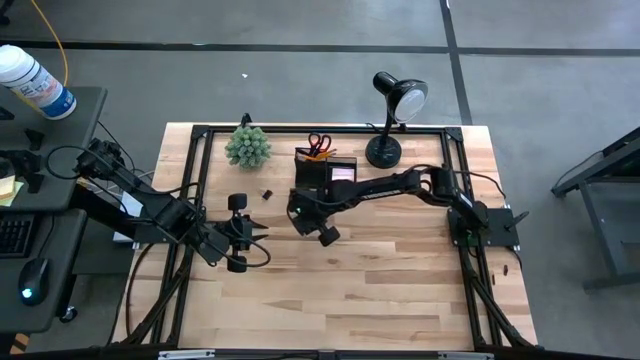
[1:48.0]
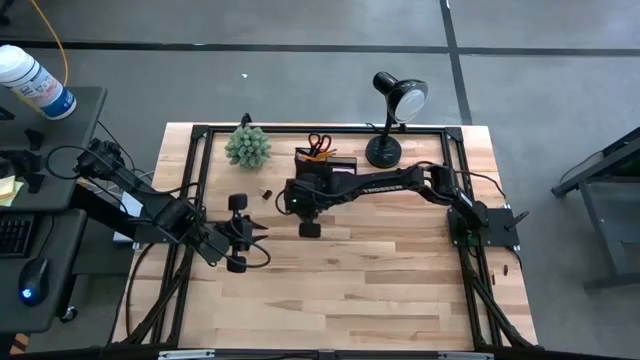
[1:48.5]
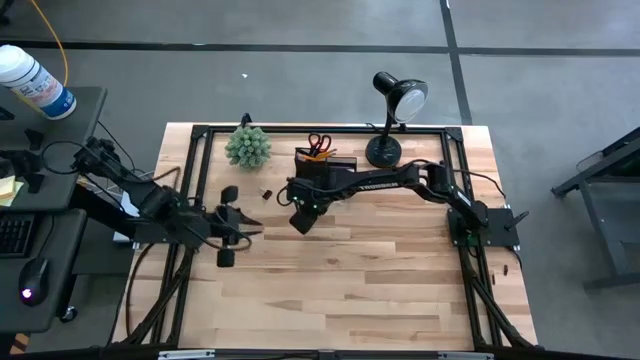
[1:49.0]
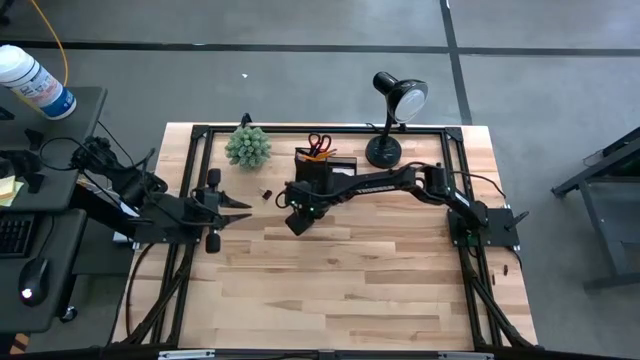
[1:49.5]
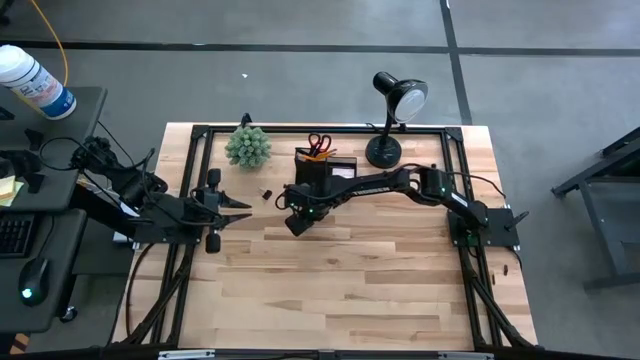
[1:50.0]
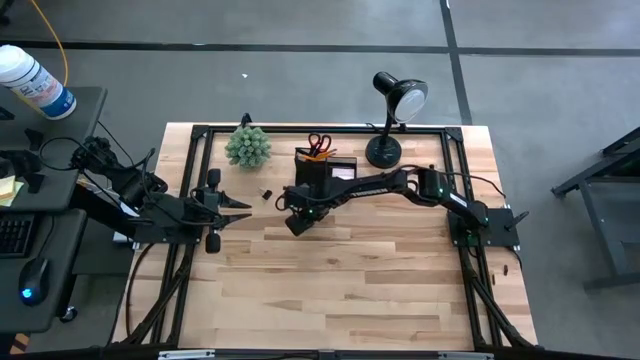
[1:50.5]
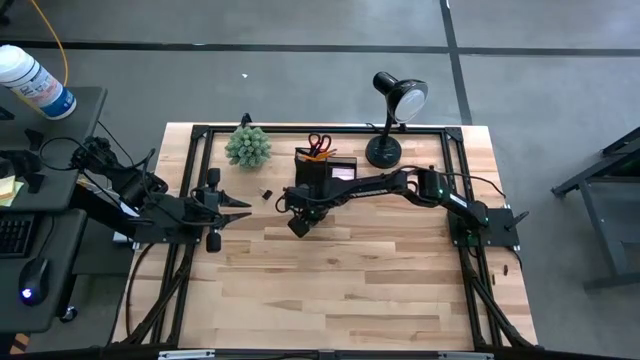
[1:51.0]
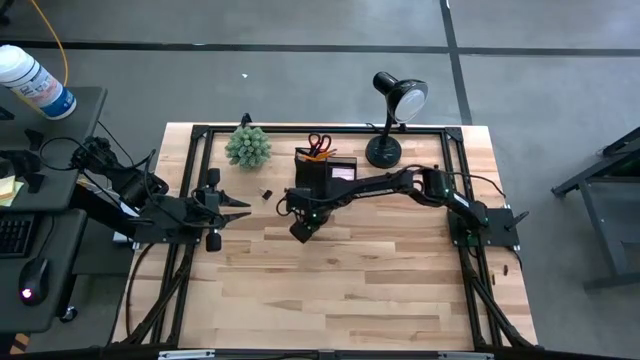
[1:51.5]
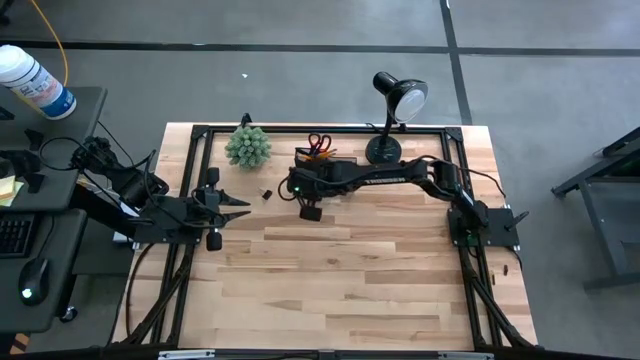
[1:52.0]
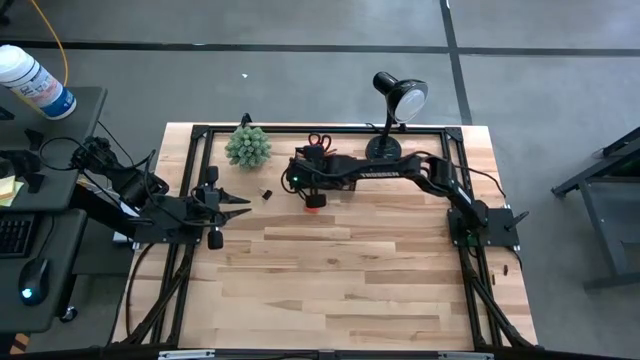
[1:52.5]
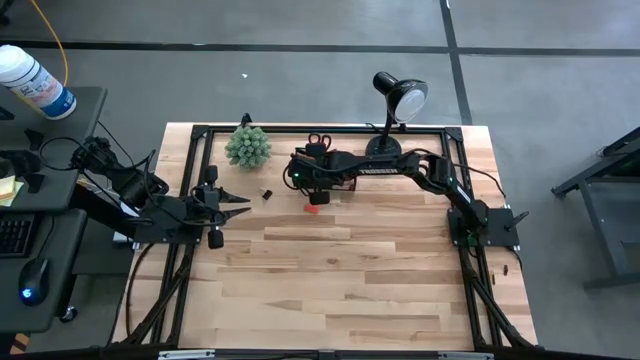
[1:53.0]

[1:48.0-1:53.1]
Task: Pick and place office supplies into organizer
Put the bottom binder clip into the desk organizer

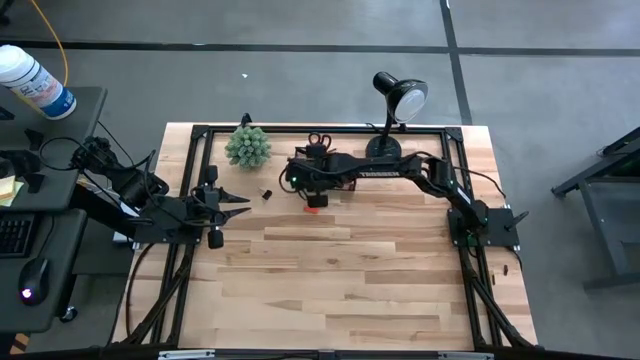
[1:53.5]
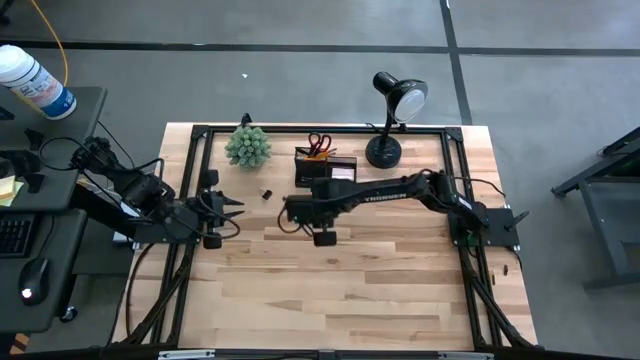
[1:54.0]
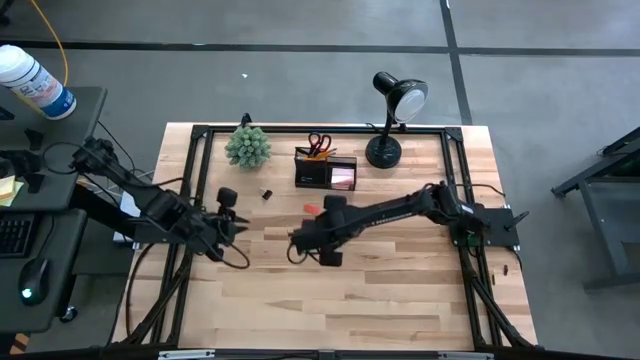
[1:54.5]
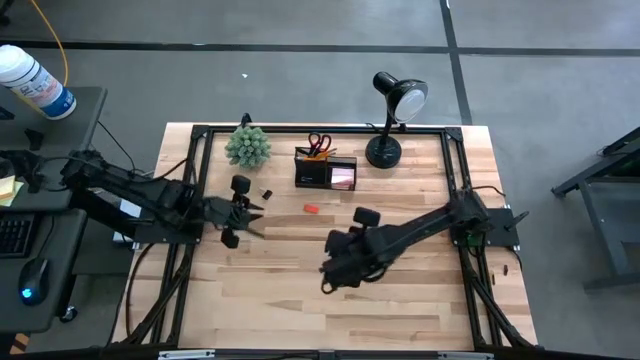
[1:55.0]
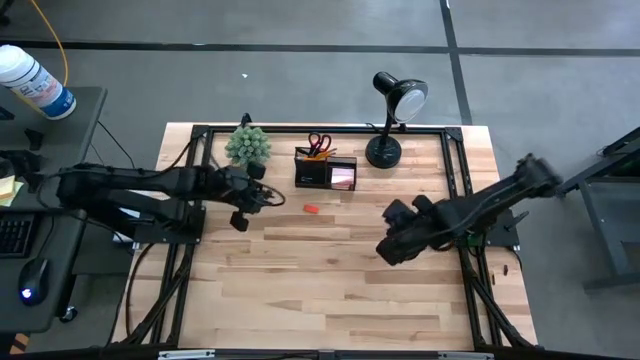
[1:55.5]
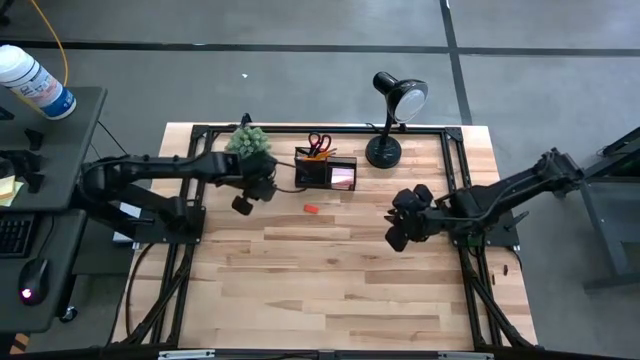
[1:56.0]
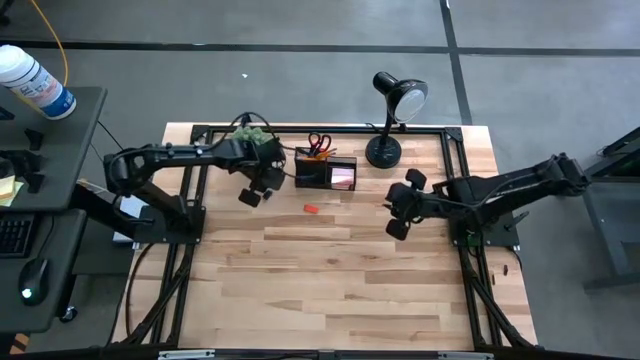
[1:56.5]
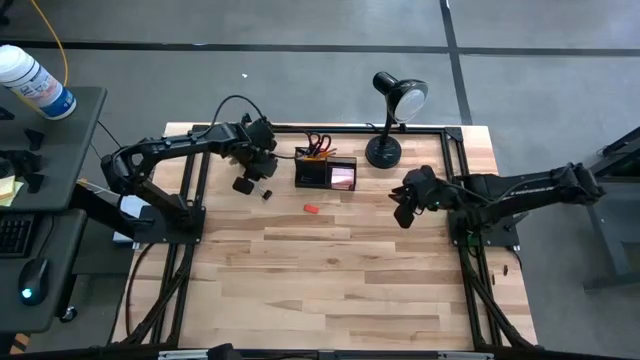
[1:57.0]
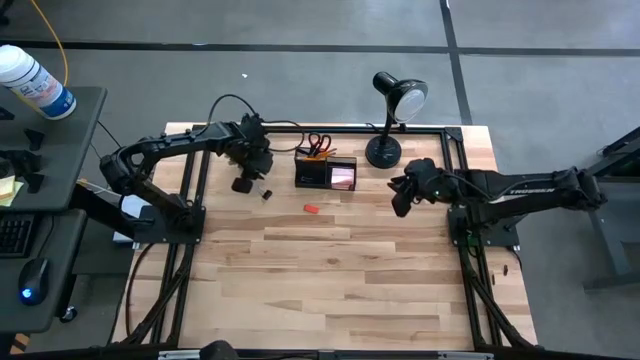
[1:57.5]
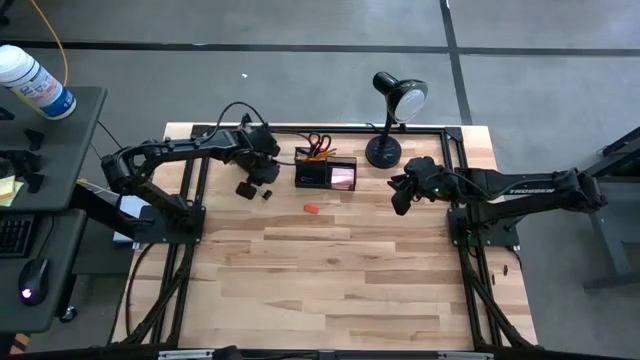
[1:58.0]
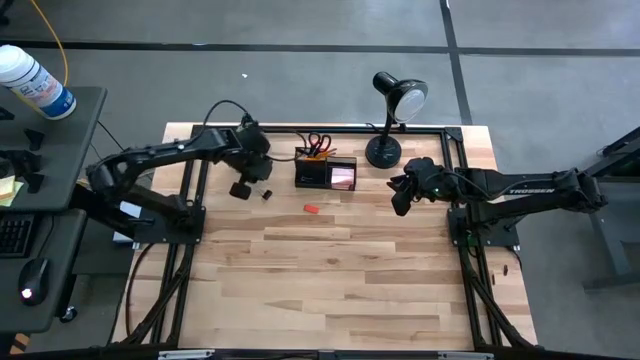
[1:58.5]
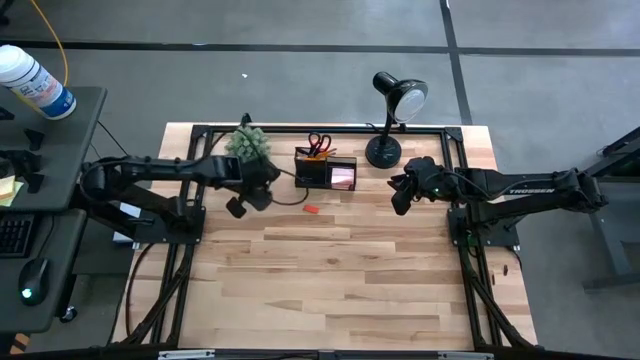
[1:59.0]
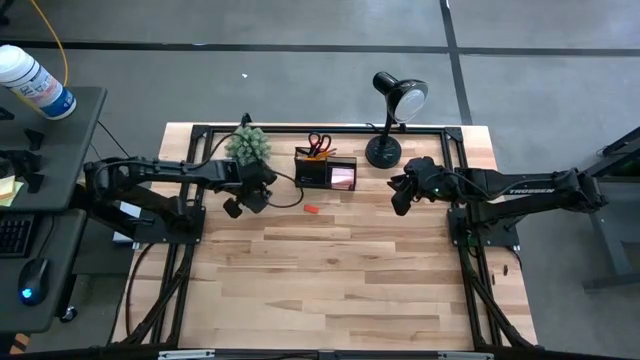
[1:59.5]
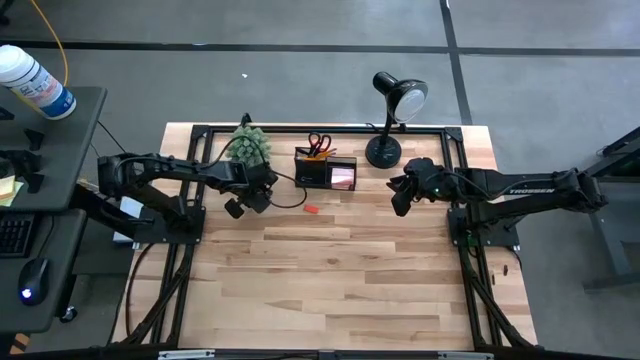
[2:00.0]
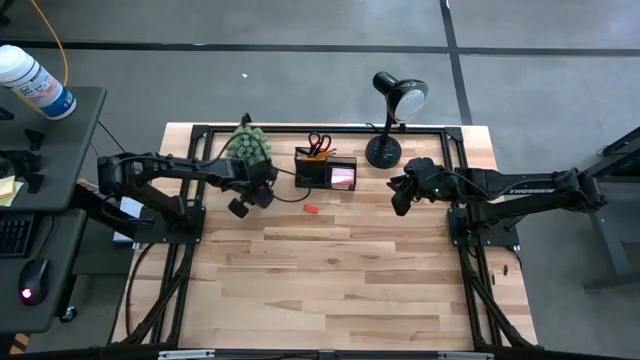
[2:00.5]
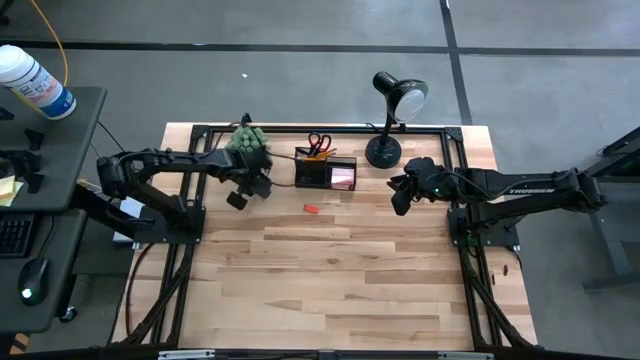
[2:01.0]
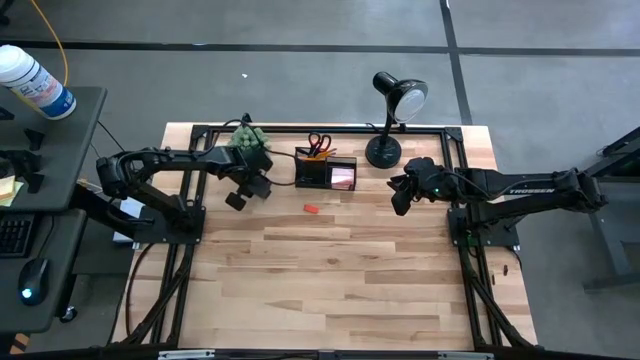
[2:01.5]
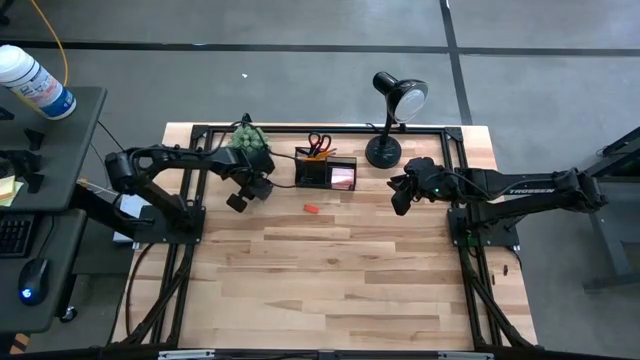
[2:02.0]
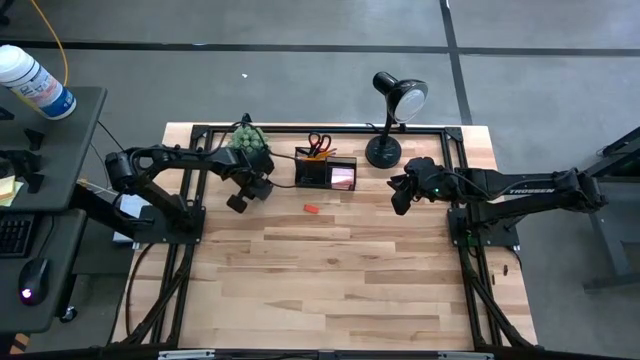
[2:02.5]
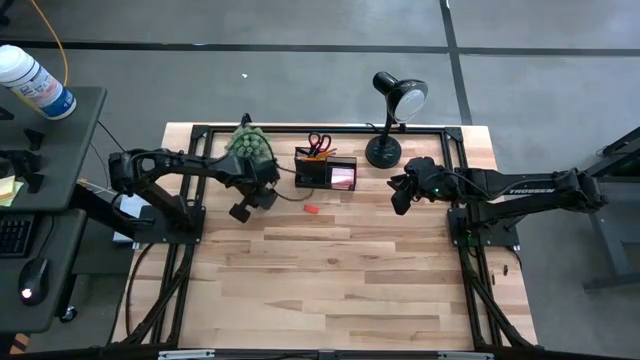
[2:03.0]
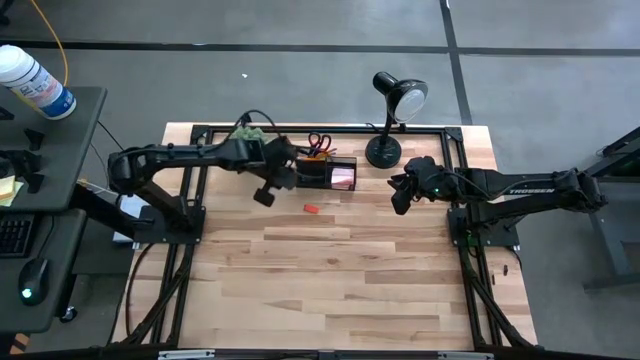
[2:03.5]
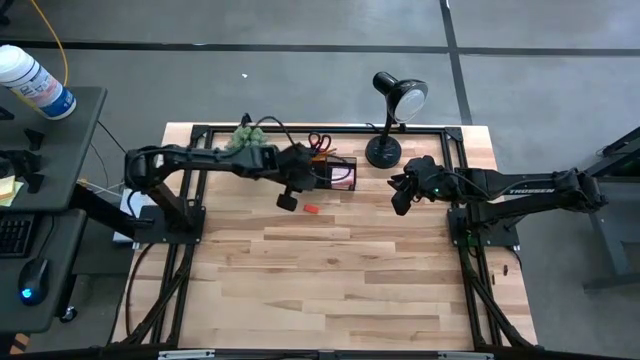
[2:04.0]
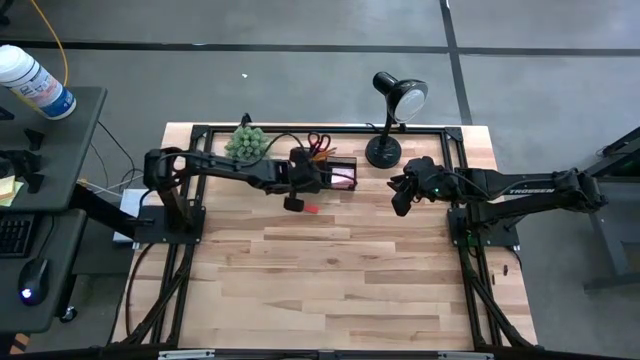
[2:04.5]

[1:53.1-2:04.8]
Put the binder clip into the desk organizer

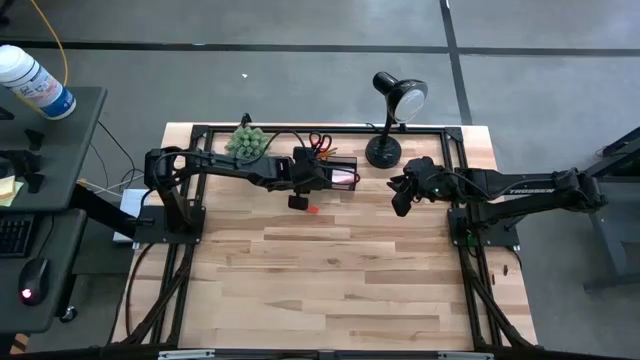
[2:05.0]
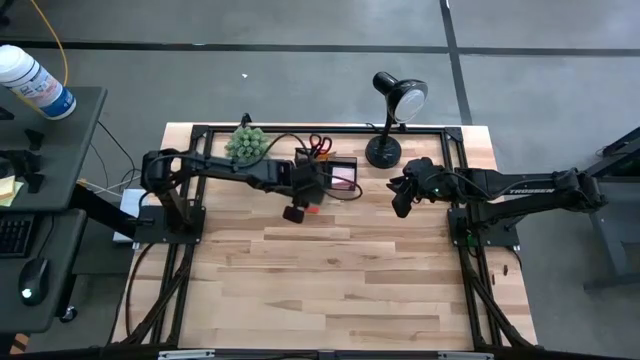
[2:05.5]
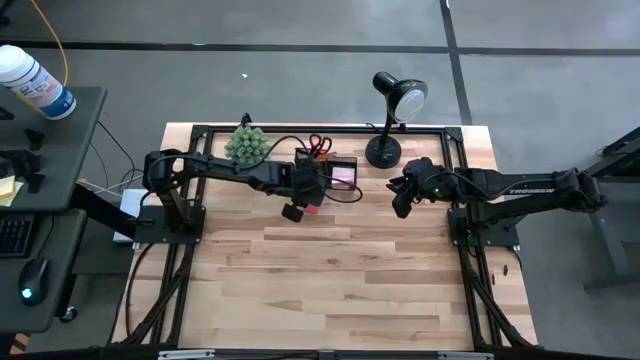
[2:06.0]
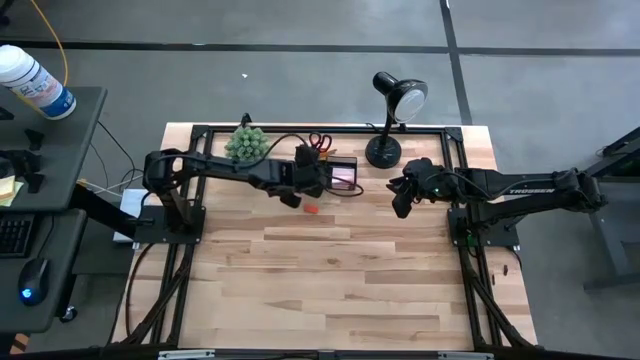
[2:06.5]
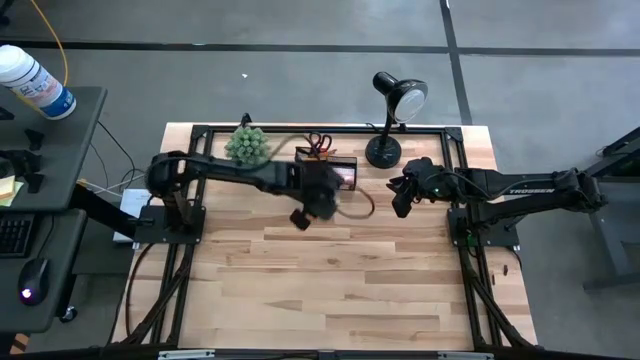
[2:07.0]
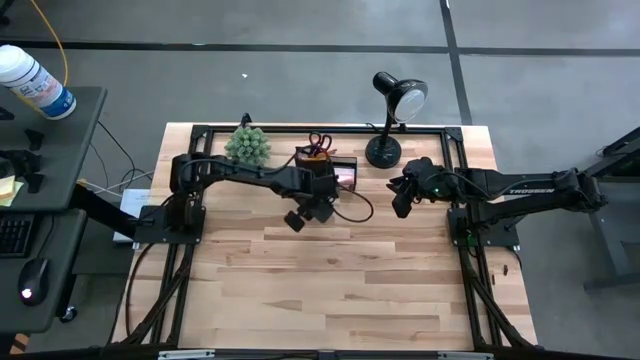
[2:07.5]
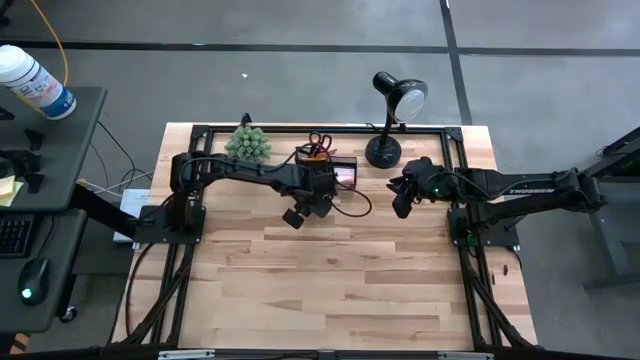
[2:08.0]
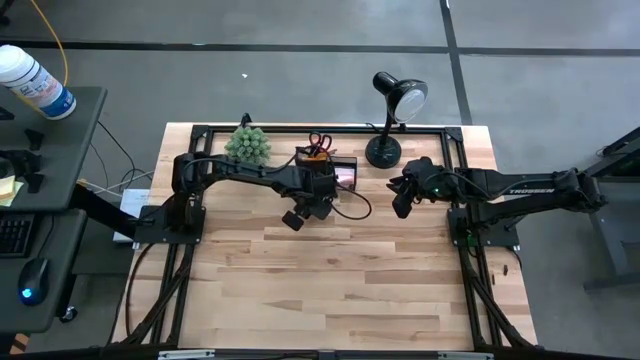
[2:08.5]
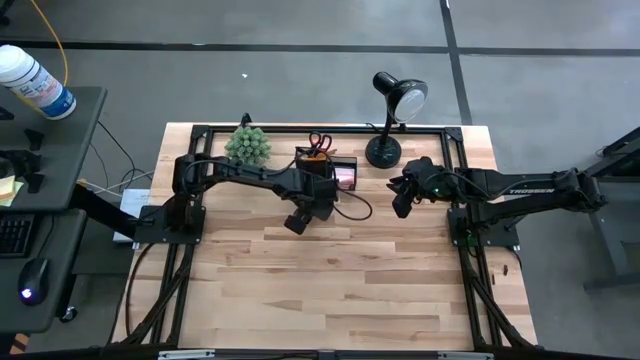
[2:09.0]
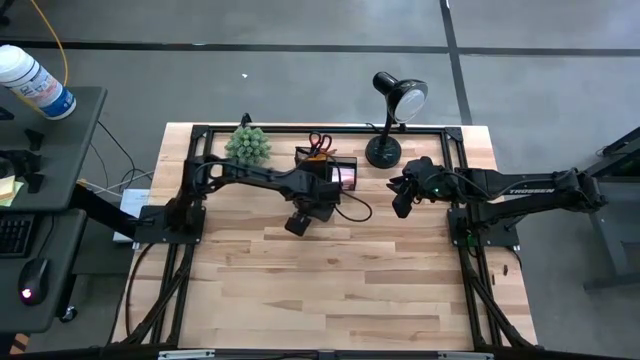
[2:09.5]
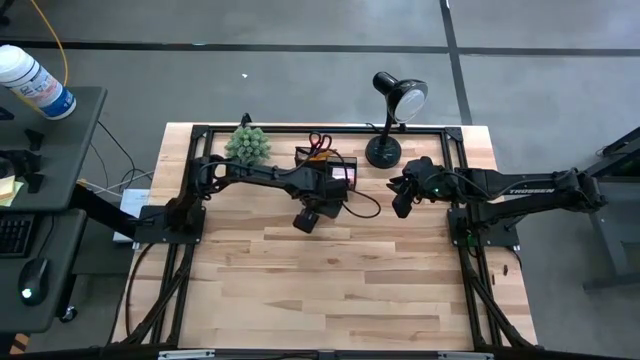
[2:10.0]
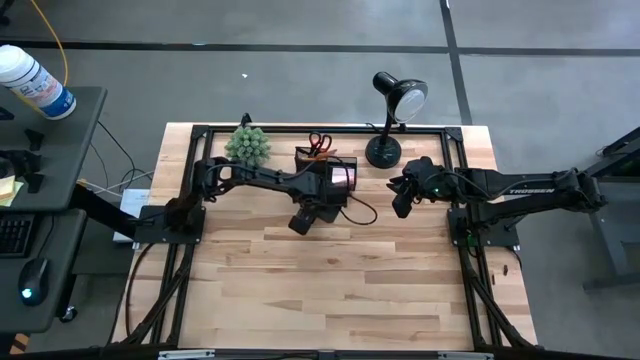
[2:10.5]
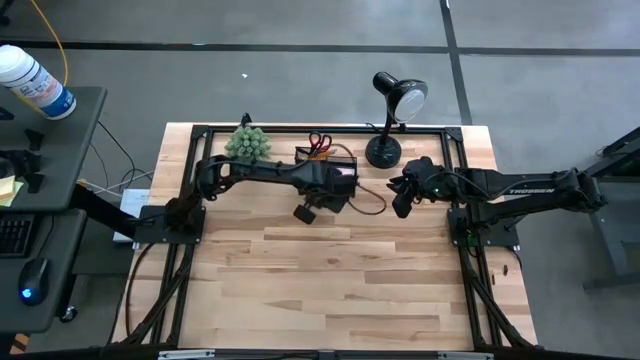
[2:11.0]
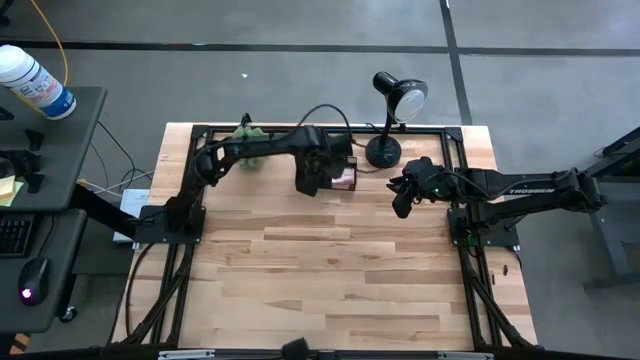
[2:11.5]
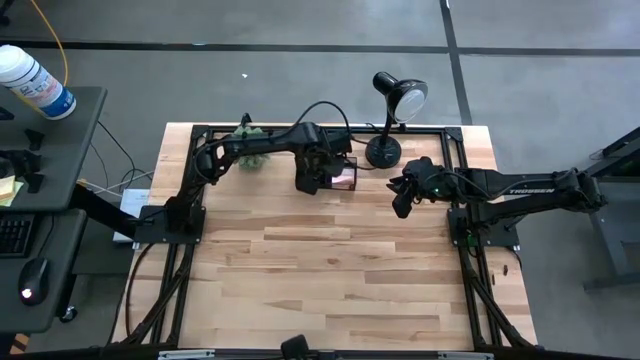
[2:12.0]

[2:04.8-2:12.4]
Put the orange eraser into the desk organizer
